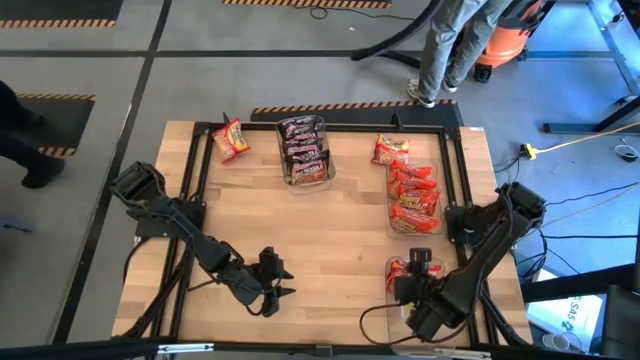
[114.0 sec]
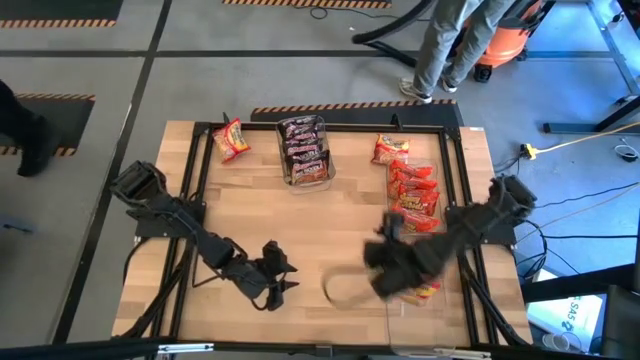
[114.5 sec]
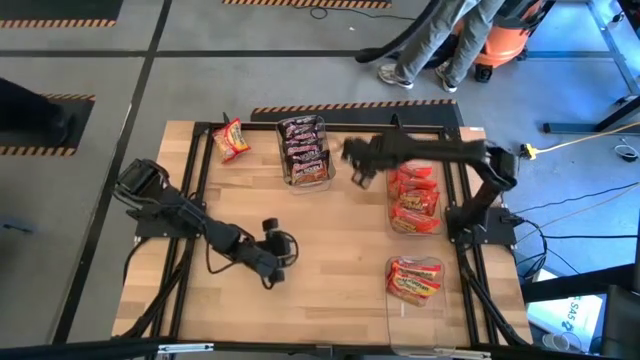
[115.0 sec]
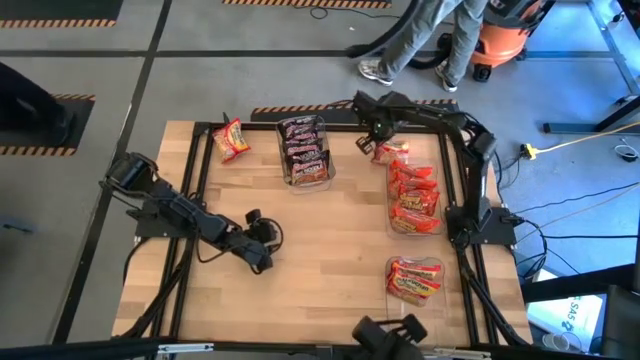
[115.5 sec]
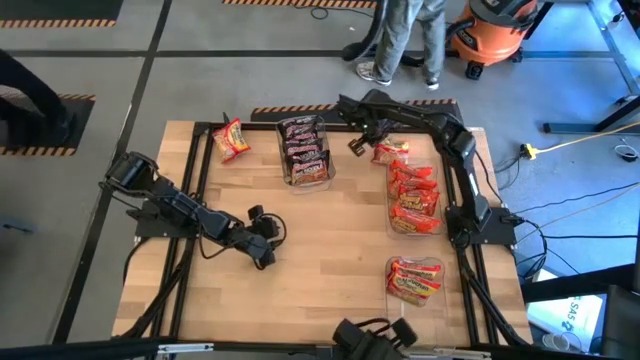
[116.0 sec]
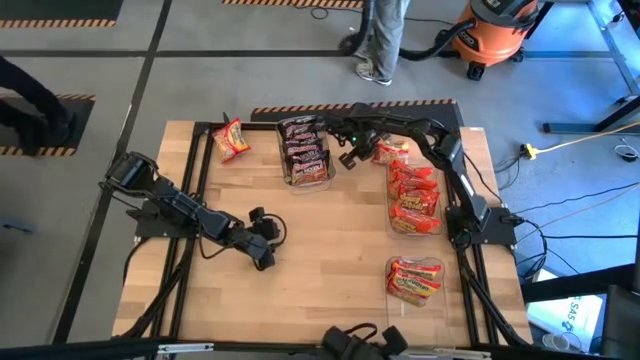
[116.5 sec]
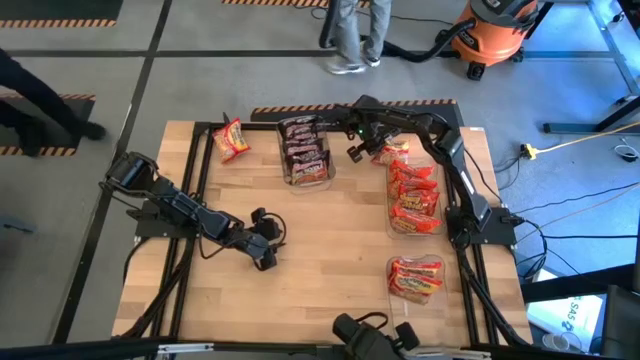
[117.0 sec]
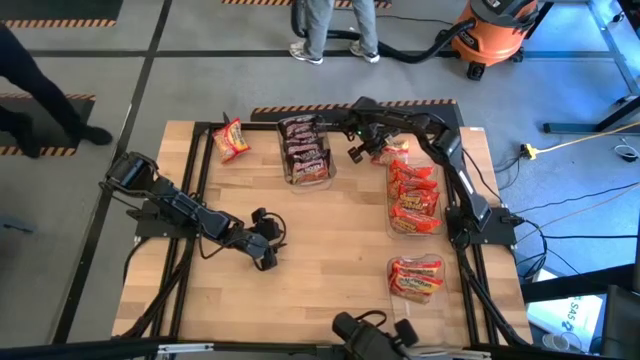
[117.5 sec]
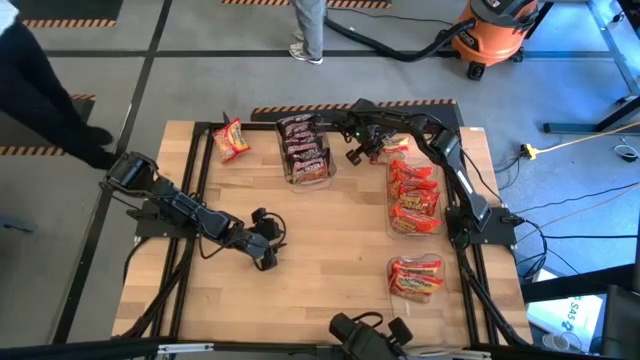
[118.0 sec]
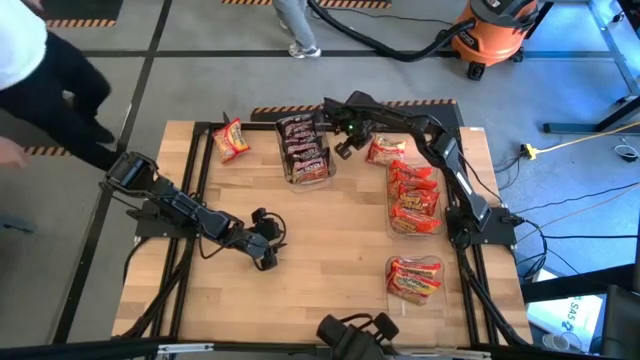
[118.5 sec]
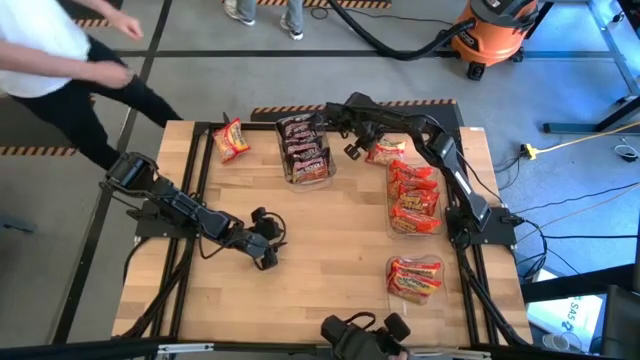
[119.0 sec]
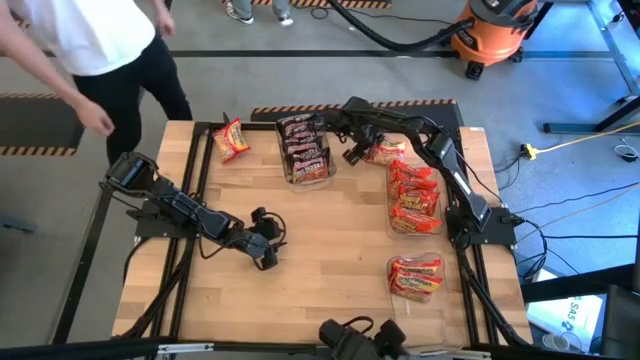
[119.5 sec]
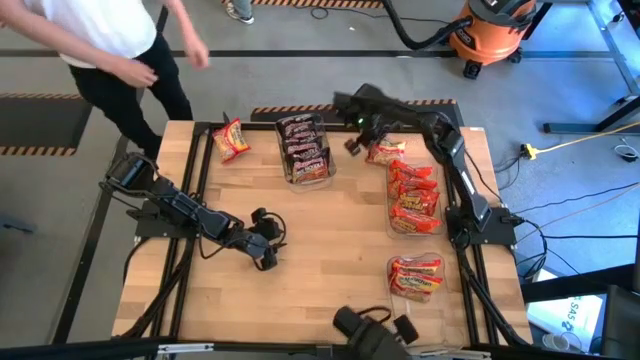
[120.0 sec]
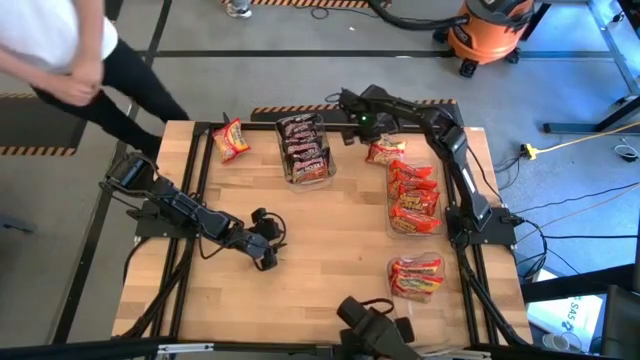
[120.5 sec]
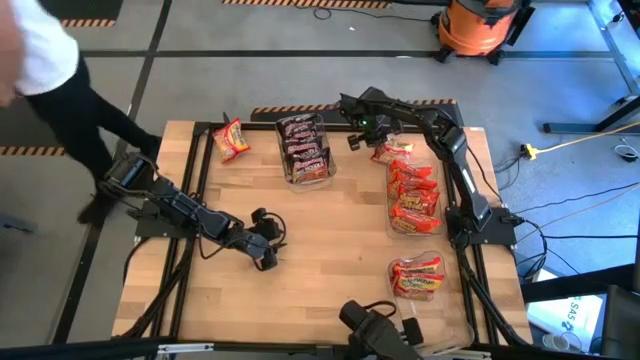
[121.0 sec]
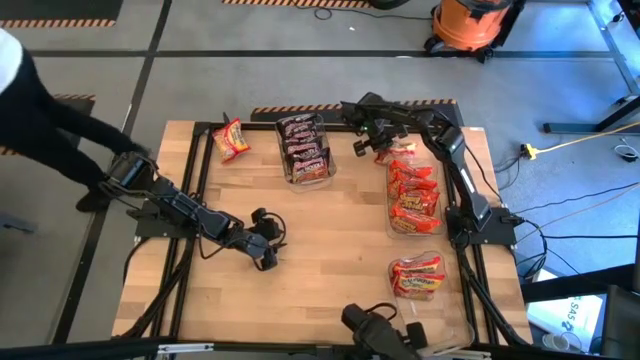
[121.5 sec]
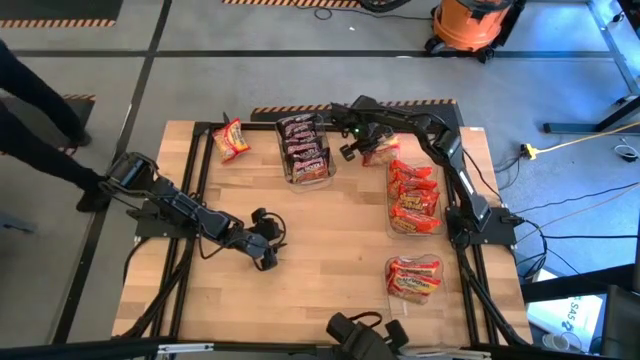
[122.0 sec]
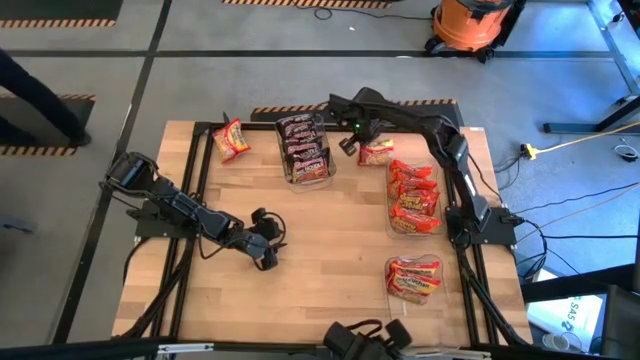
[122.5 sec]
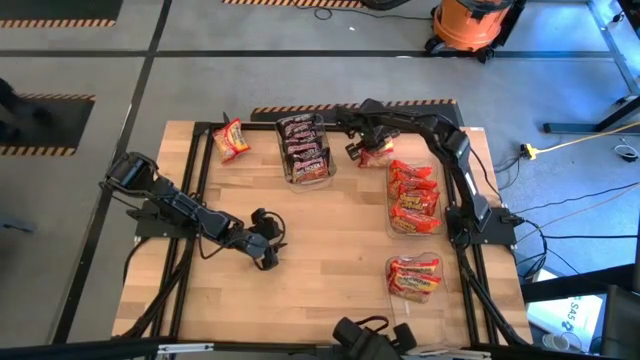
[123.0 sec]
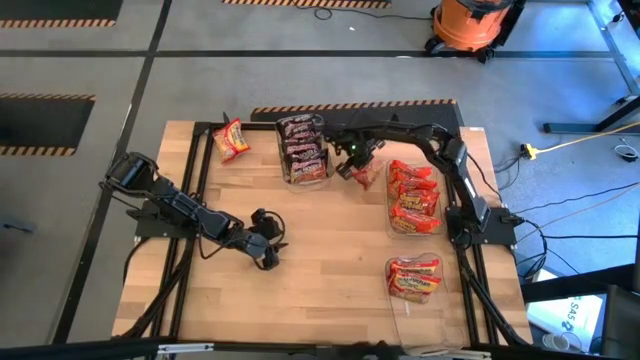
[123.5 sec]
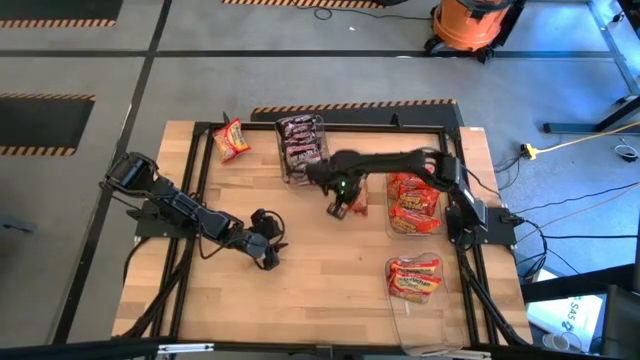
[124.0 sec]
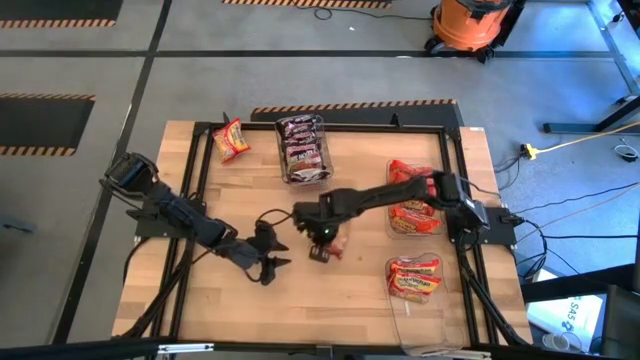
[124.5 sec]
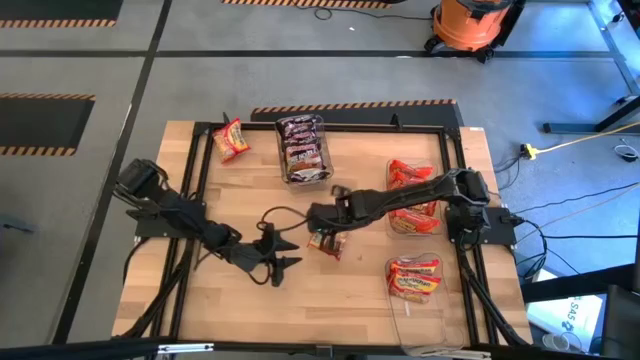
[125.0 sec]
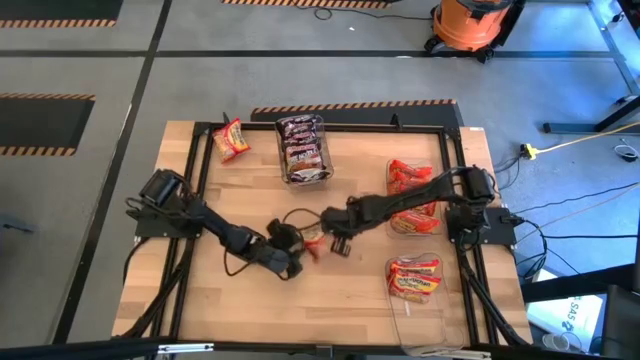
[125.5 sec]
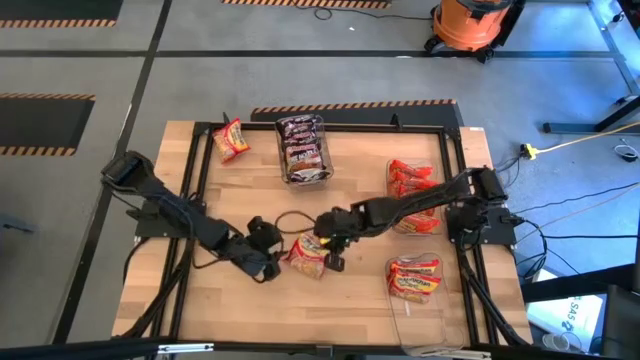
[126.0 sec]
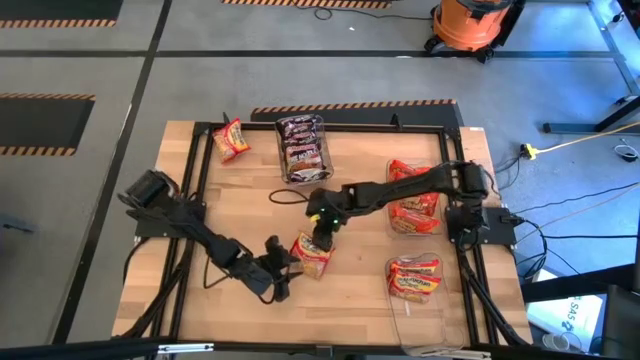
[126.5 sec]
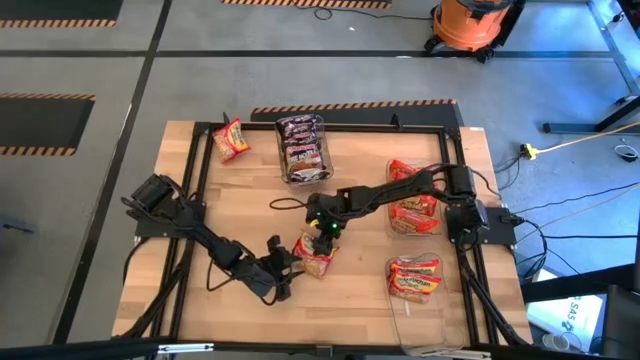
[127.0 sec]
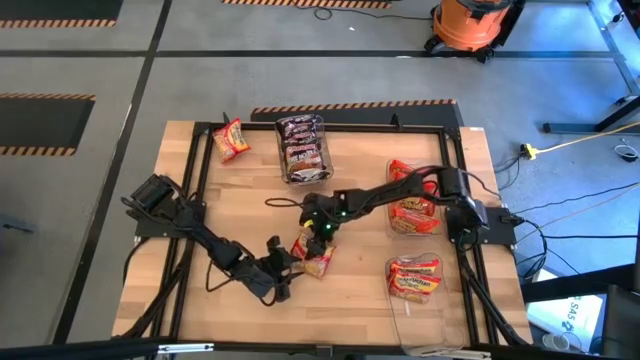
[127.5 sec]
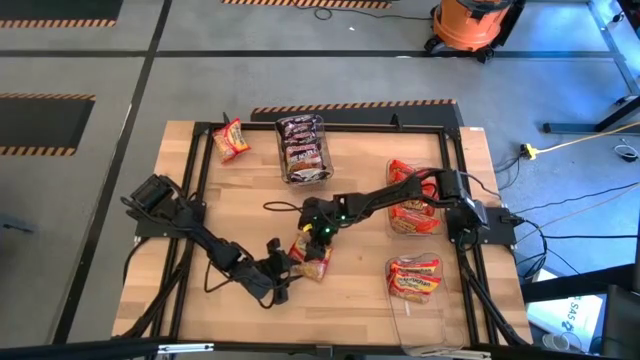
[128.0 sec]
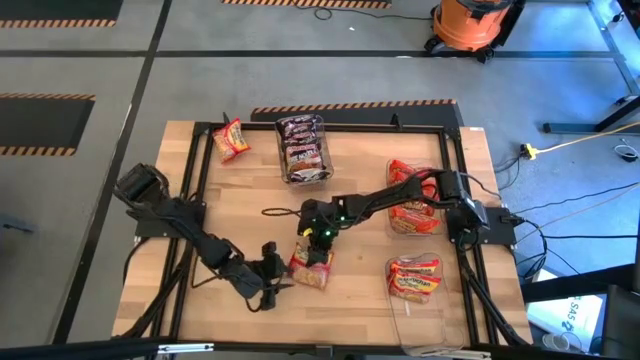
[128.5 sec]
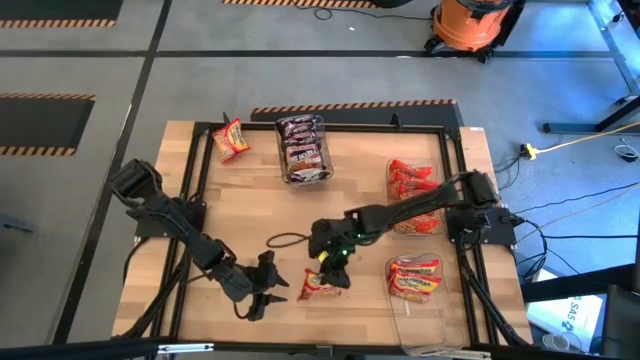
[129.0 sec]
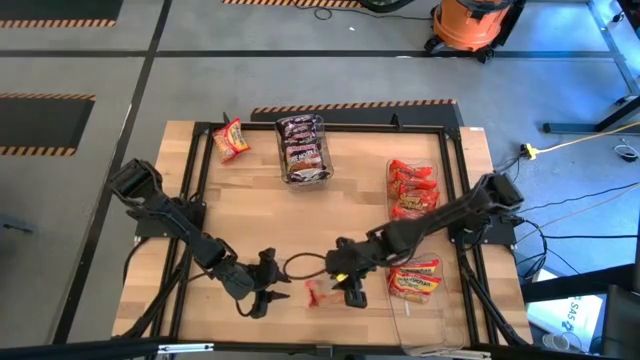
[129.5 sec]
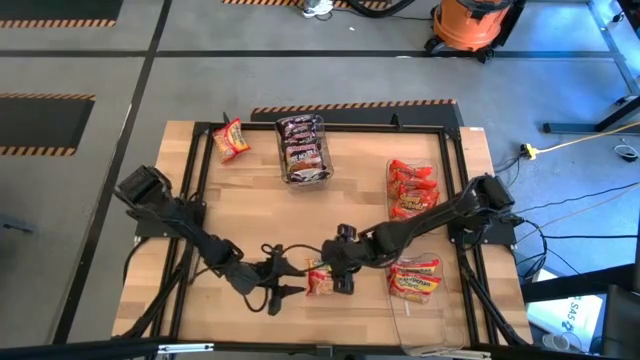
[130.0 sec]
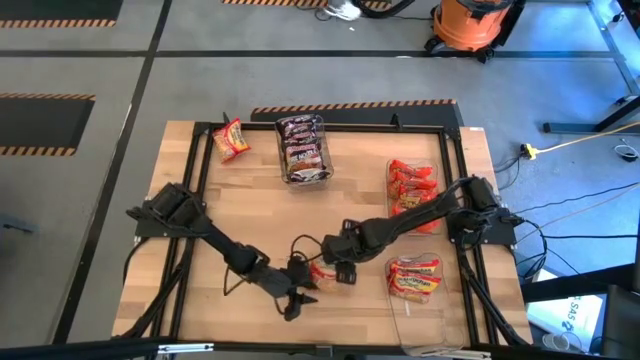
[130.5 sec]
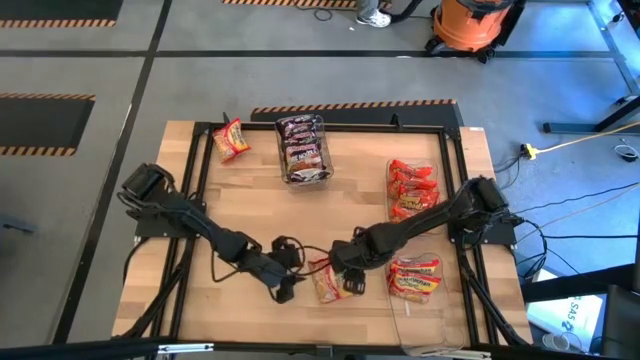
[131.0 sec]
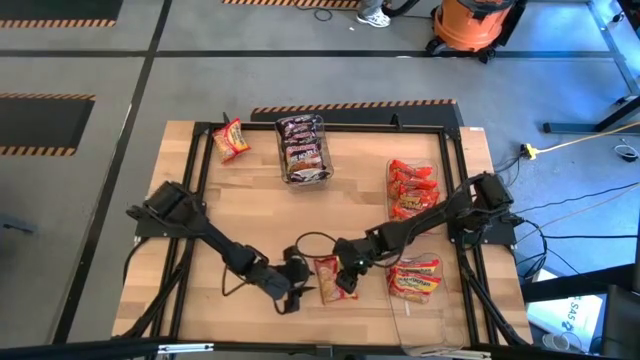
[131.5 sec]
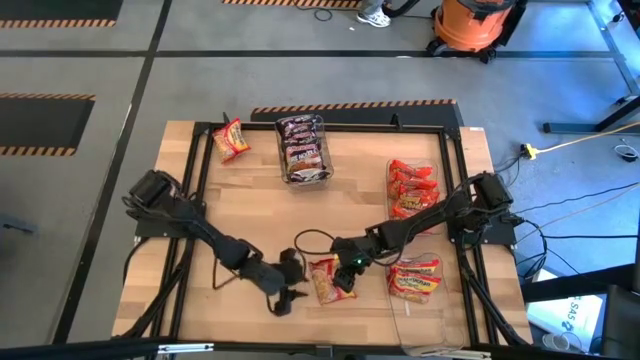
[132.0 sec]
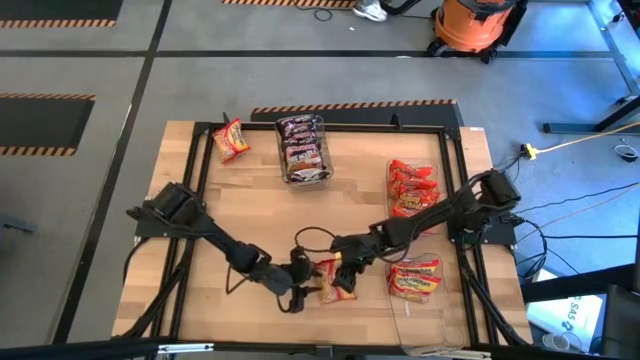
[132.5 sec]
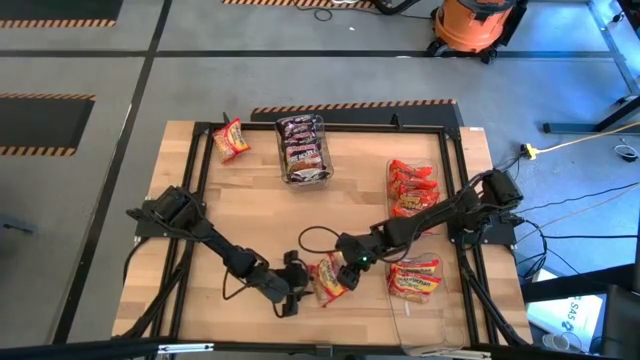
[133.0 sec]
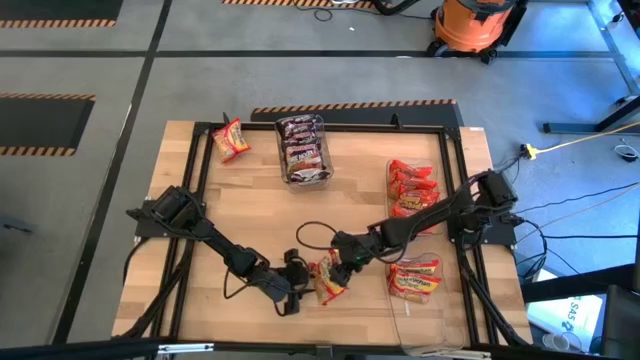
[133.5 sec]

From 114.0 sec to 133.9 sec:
Task: Sort Maruchan noodles
Put the red noodle pack into the bottom transparent bin
